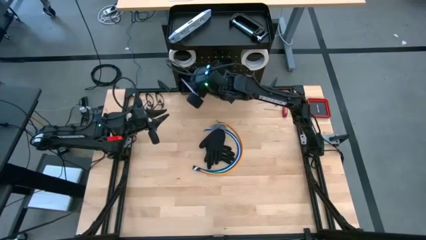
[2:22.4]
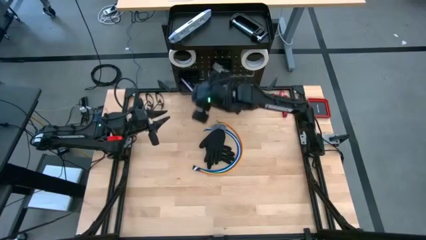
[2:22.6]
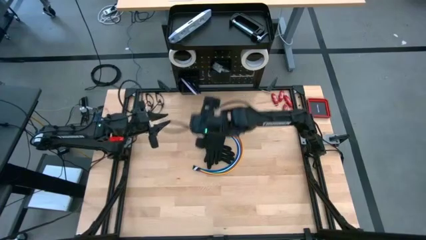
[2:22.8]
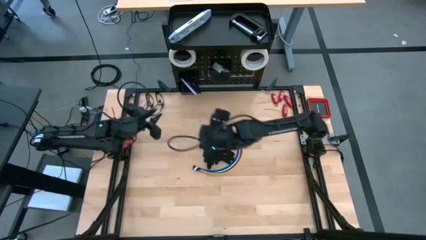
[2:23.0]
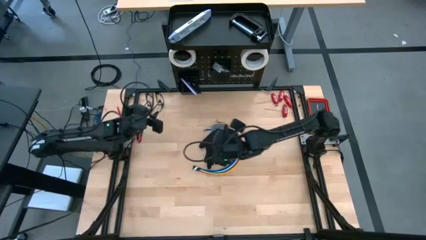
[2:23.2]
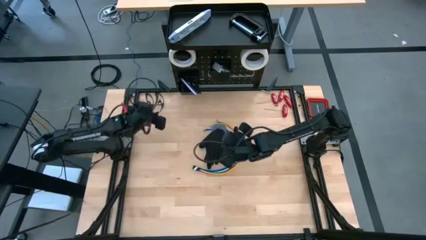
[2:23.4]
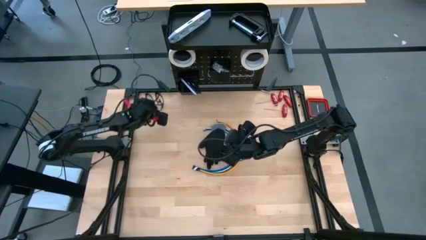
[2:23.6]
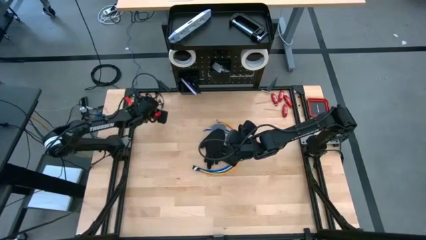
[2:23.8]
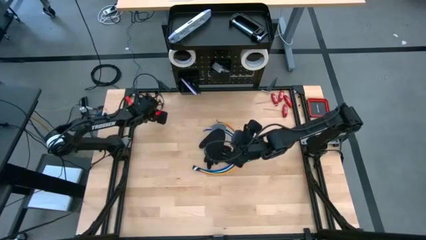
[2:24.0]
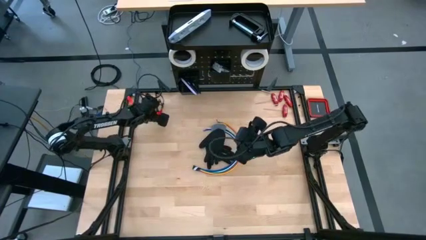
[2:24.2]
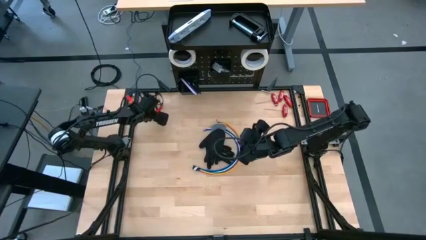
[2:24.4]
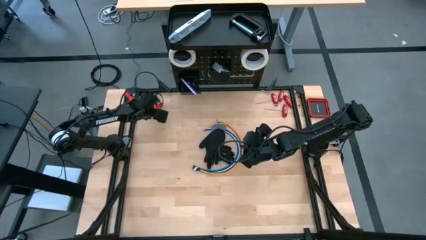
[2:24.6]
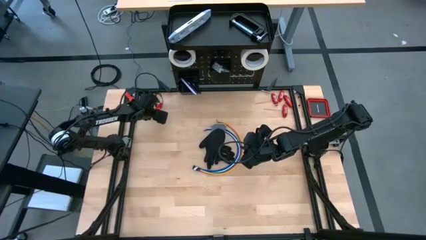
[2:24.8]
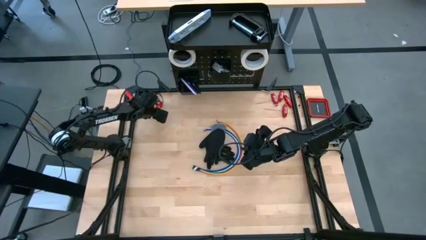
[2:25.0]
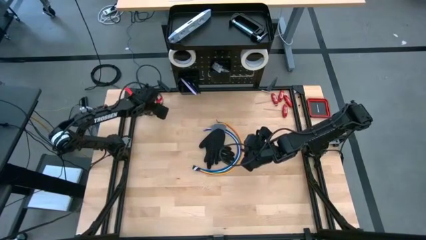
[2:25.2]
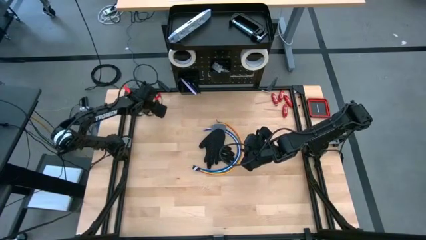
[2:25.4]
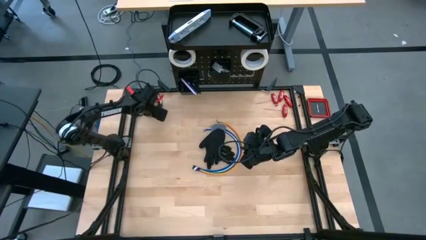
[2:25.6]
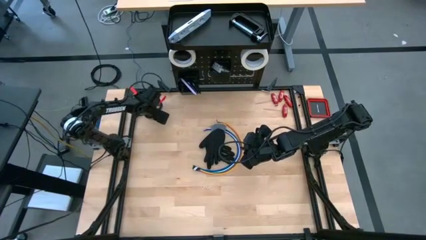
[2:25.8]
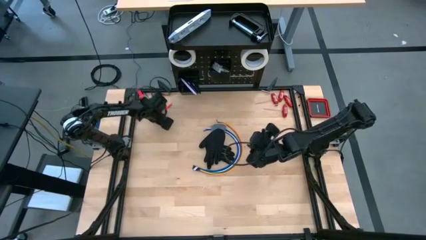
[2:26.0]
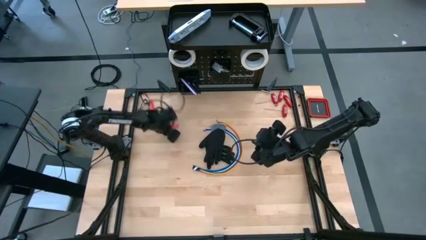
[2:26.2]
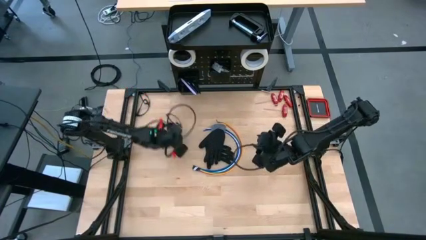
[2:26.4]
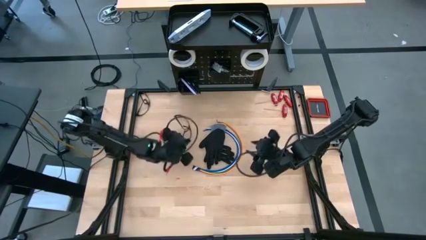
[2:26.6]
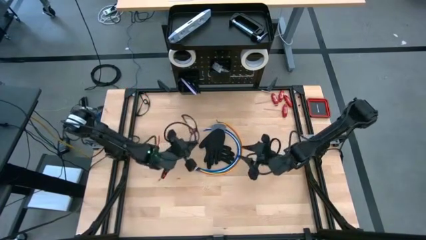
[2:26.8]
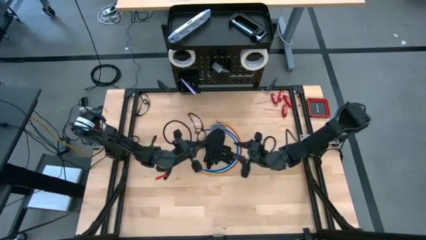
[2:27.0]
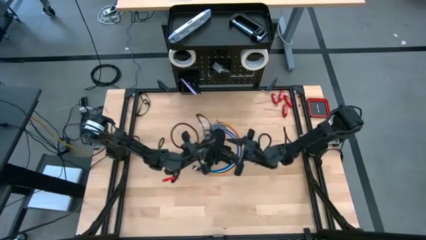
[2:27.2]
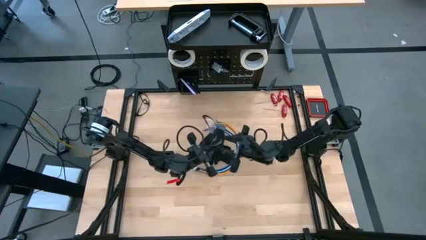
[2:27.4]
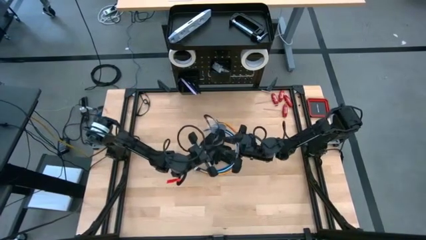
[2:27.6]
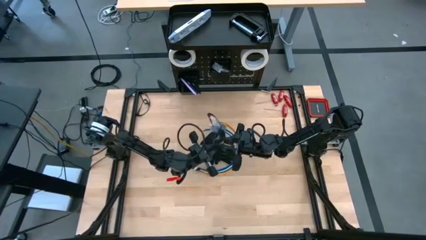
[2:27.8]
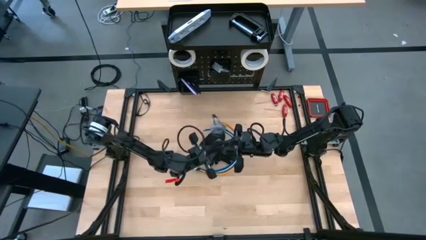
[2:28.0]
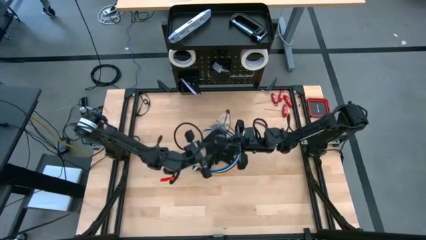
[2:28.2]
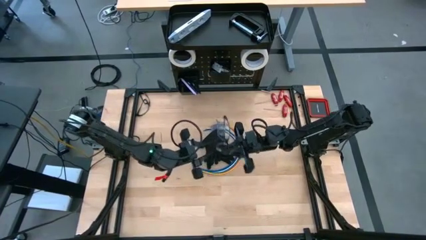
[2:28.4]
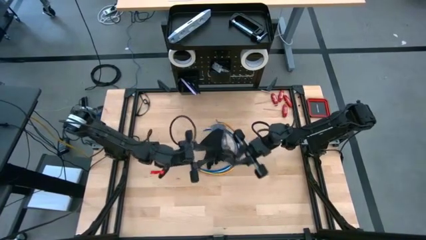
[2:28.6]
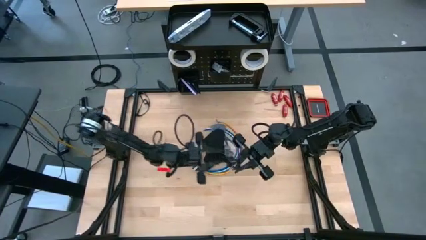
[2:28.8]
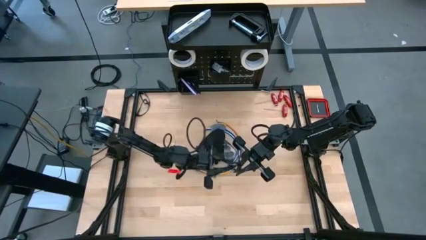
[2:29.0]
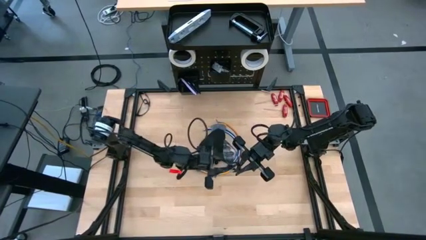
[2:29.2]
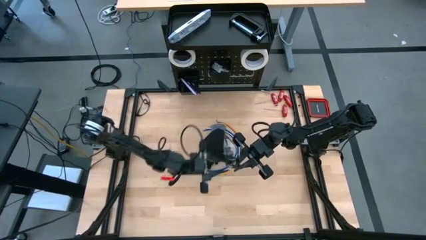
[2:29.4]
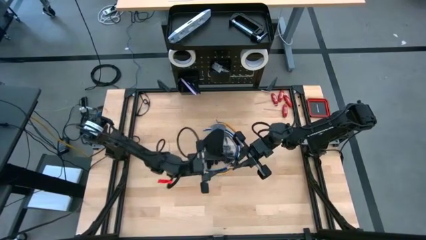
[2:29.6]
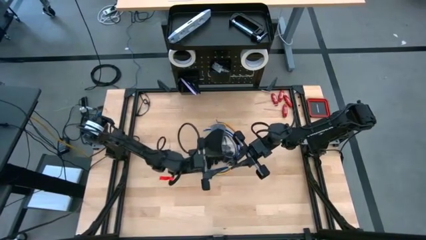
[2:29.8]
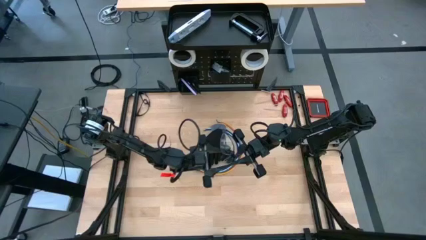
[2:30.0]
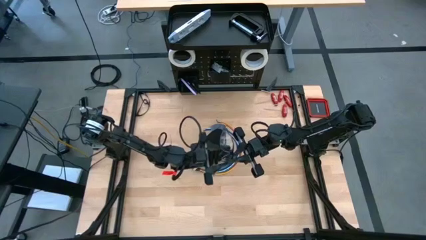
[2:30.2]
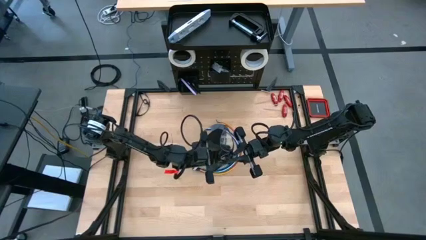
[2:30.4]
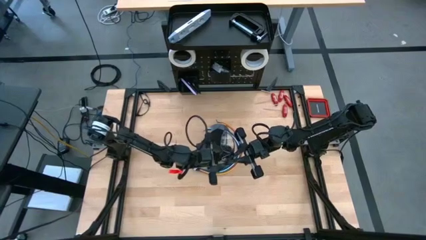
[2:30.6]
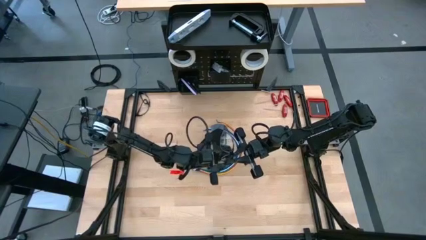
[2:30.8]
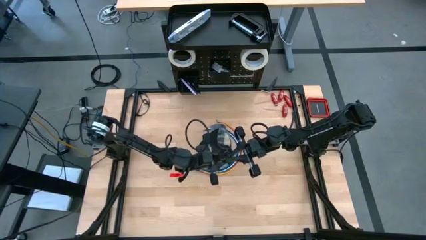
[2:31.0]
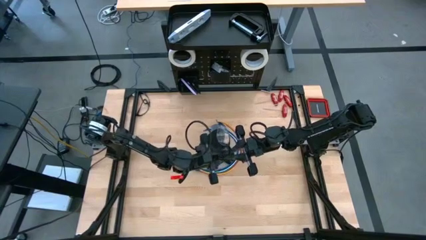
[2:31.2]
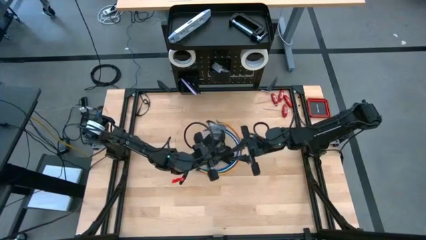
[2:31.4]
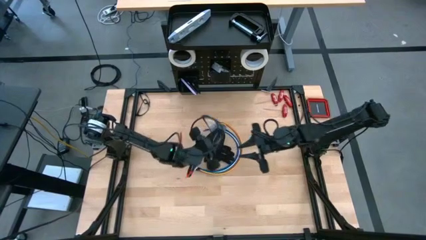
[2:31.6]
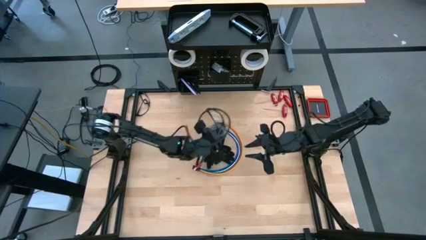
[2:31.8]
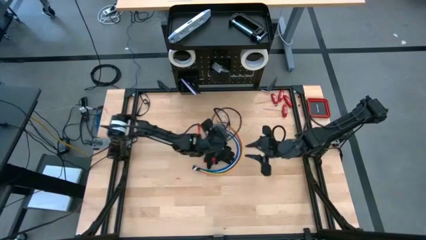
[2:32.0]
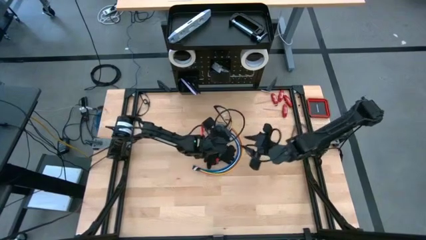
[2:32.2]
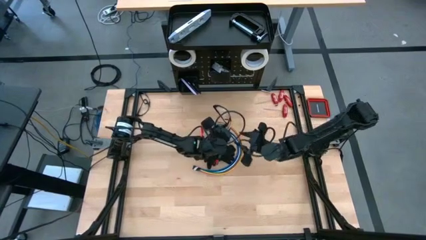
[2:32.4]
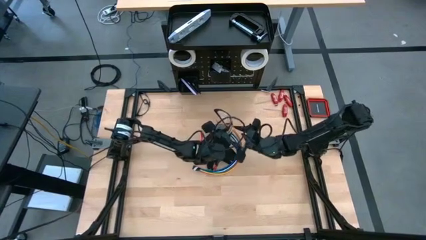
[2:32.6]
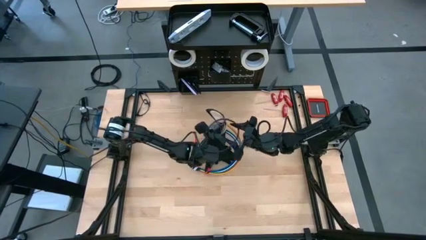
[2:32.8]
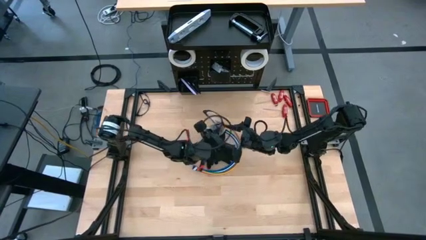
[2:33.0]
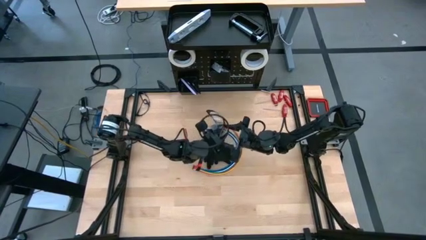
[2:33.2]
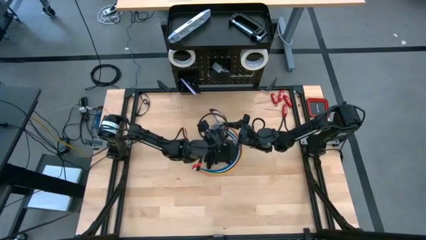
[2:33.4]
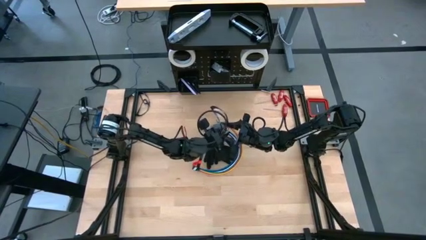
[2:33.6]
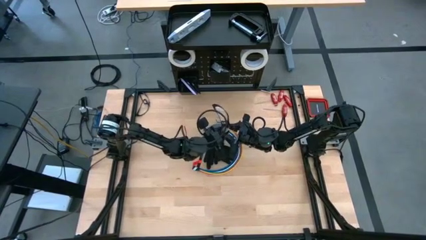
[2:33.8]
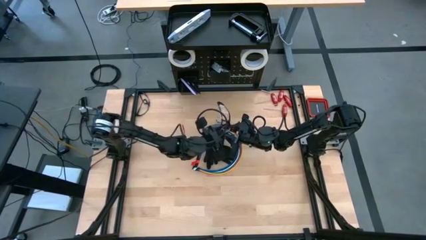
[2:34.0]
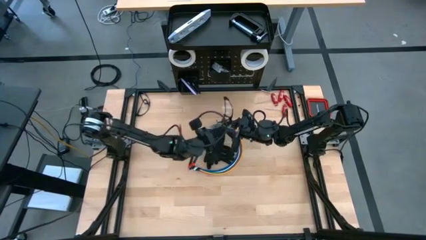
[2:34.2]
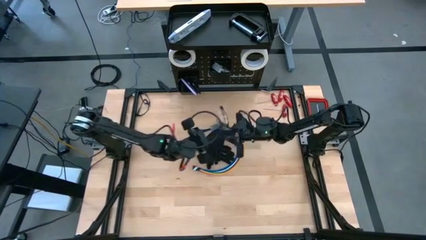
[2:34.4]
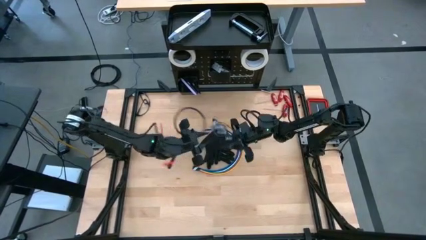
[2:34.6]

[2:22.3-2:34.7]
Task: Hang tools onto peg board
Hang the safety goggle on the peg board

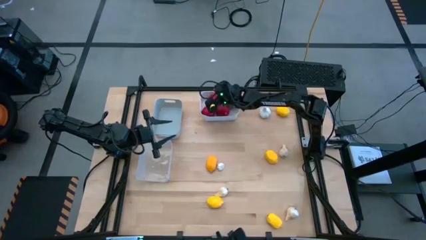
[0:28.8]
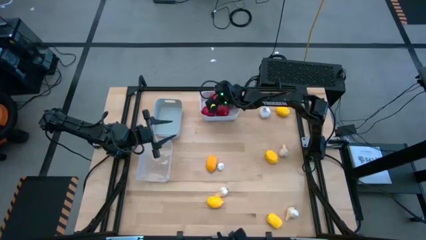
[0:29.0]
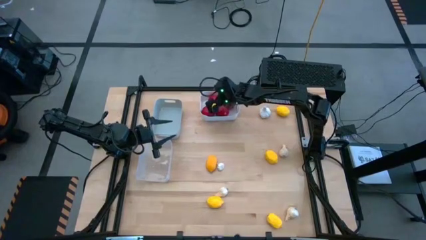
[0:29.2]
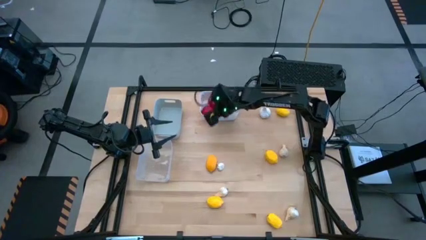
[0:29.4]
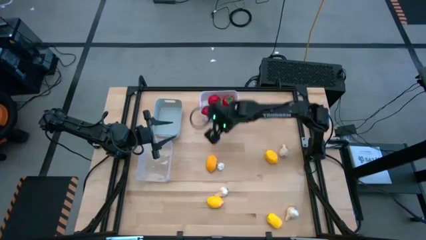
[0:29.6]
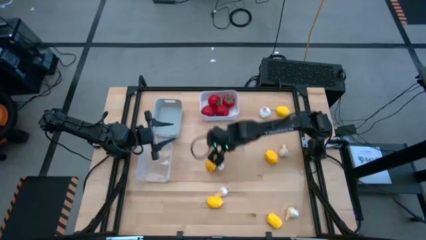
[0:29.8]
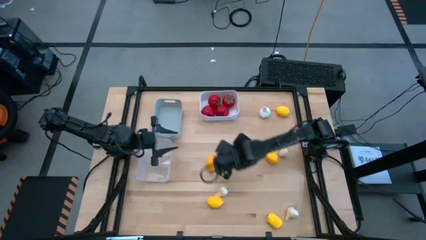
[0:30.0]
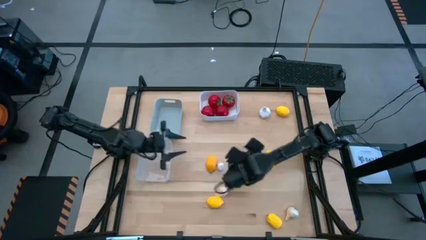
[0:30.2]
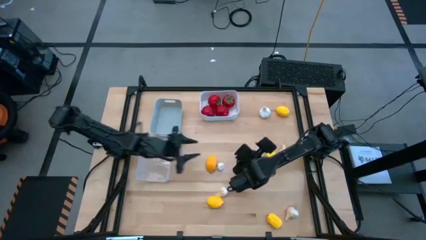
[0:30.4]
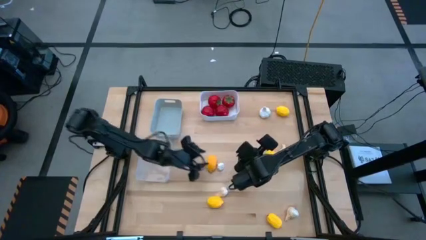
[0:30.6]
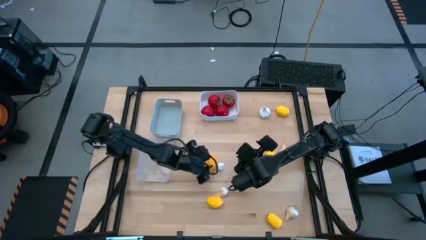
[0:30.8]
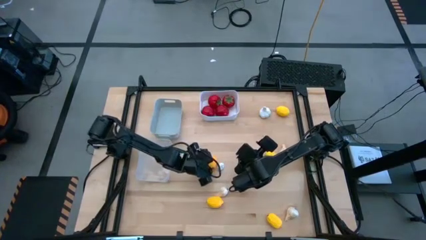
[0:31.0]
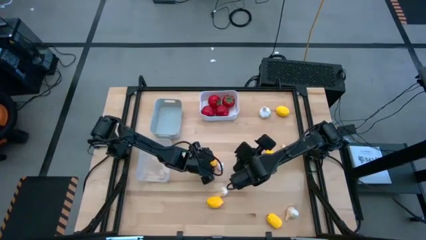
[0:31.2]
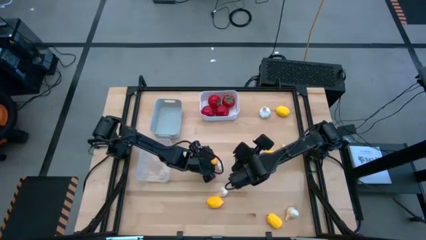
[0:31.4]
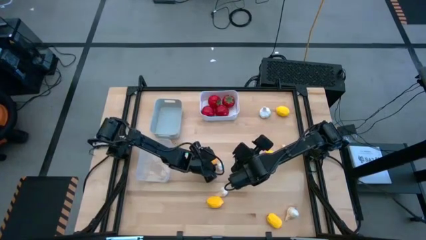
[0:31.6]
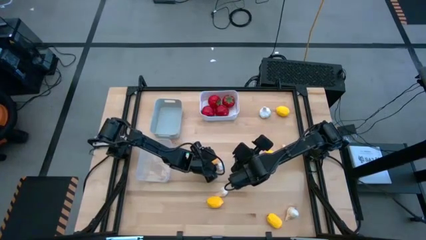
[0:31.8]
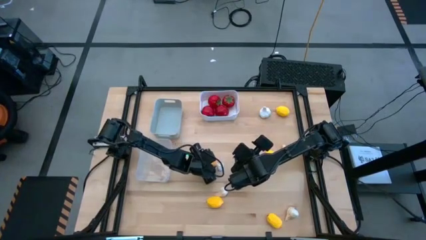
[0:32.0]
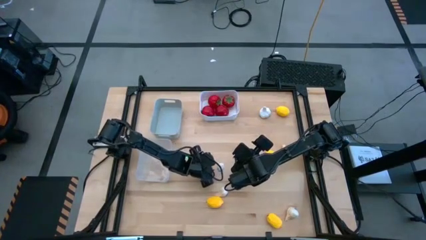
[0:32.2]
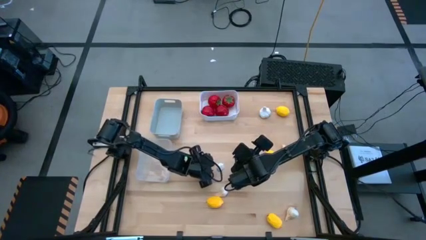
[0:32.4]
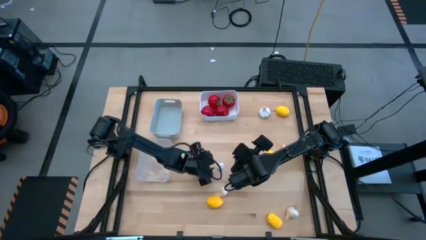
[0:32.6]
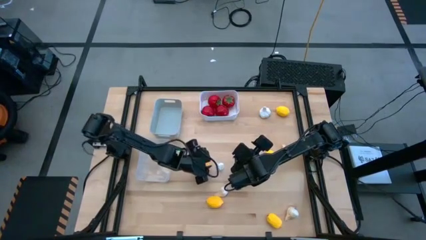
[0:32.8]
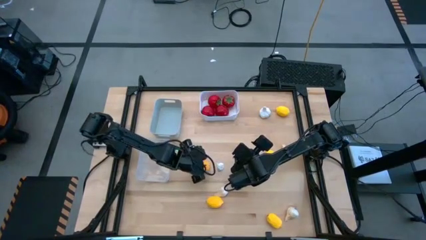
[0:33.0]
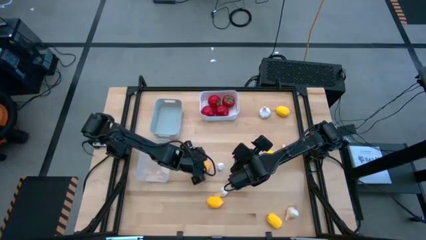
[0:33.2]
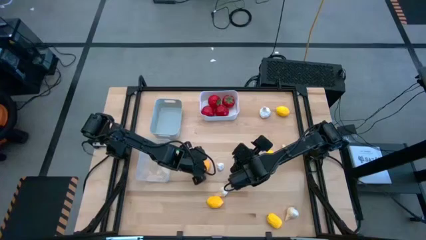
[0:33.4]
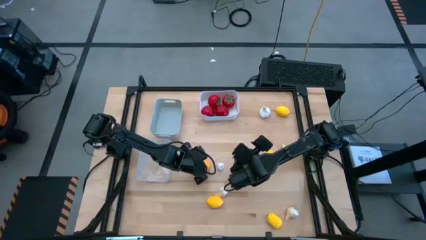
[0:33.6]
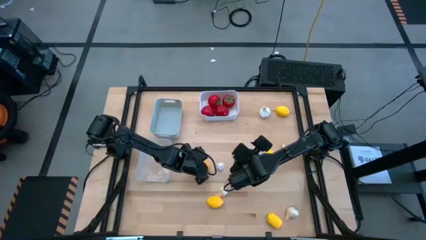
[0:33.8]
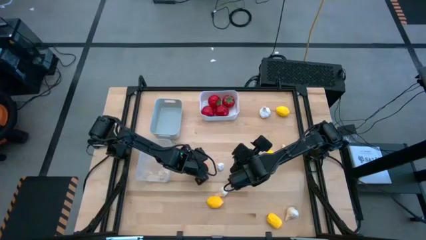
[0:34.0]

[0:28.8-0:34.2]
Task: Sort produce into baskets
Put the yellow lemon into the gray bin
